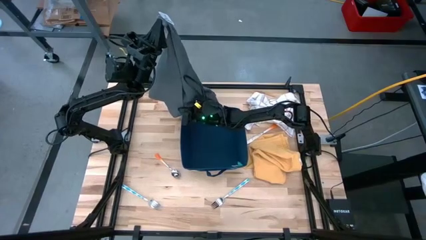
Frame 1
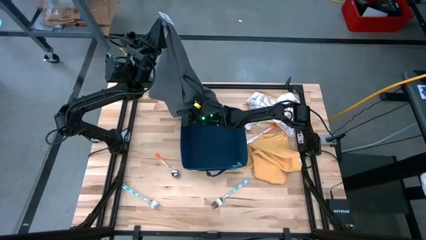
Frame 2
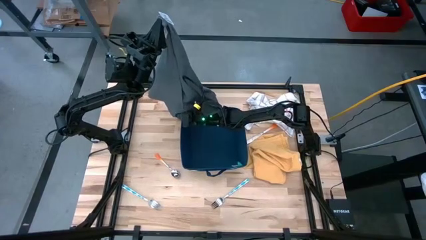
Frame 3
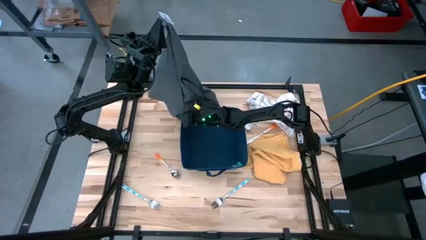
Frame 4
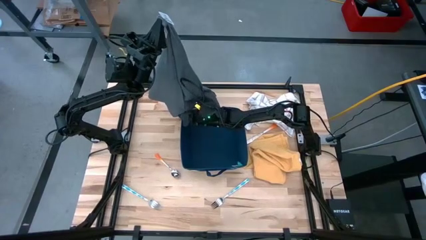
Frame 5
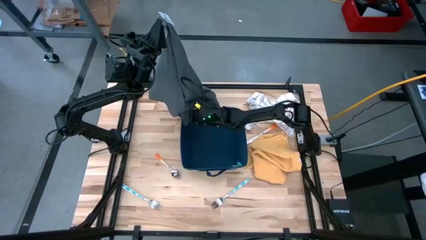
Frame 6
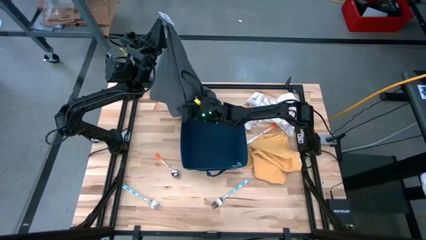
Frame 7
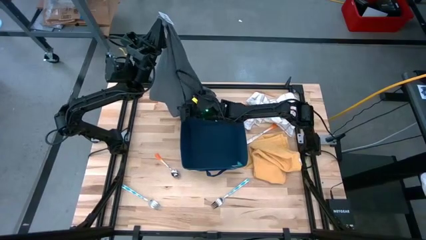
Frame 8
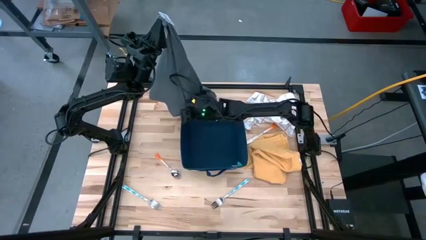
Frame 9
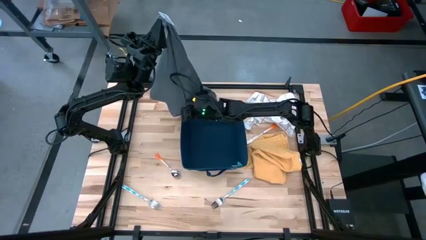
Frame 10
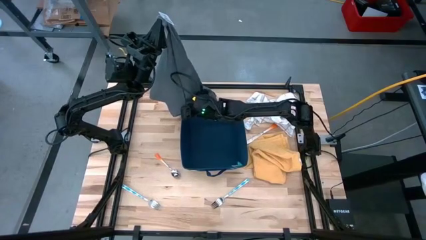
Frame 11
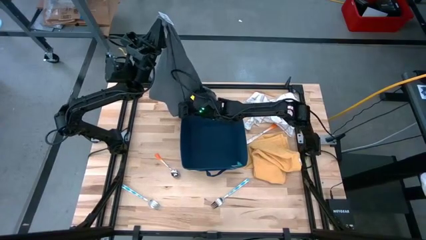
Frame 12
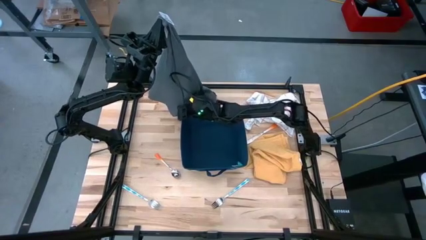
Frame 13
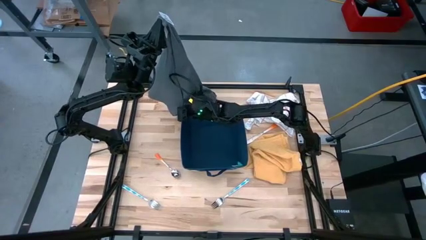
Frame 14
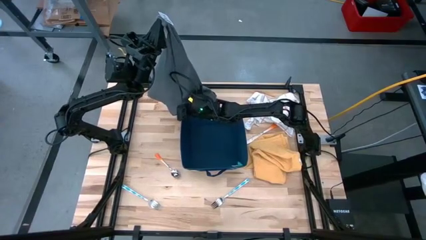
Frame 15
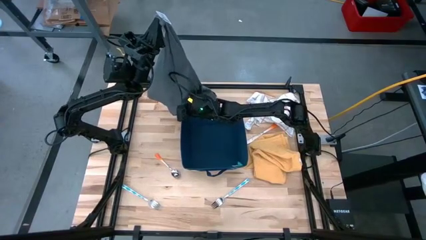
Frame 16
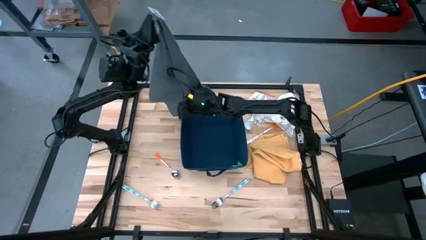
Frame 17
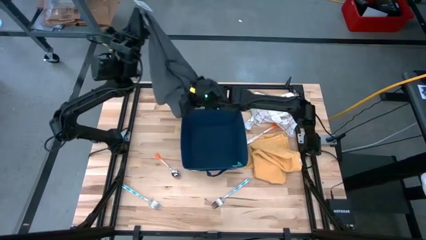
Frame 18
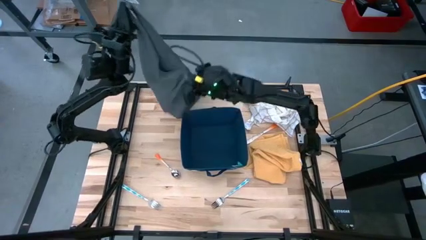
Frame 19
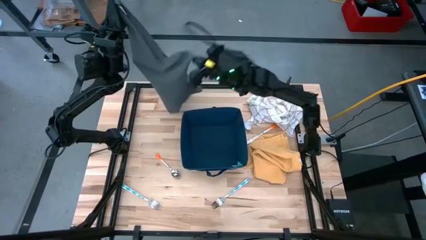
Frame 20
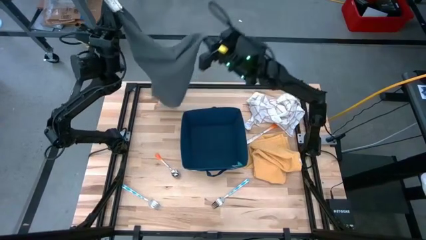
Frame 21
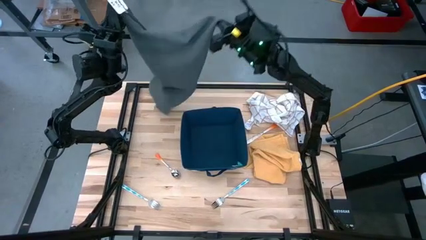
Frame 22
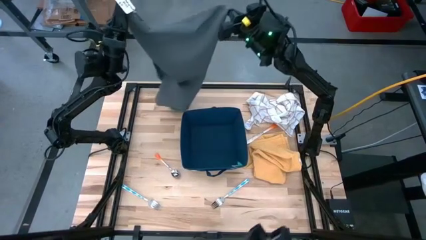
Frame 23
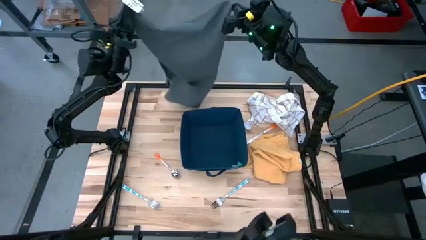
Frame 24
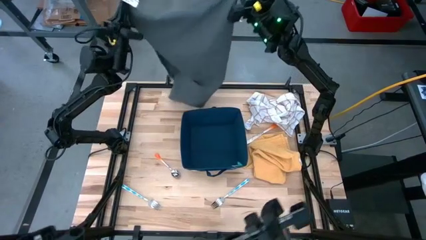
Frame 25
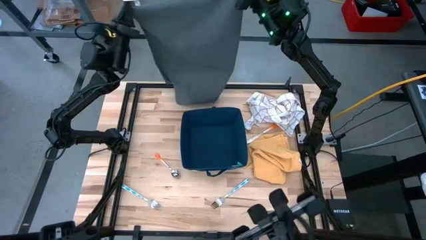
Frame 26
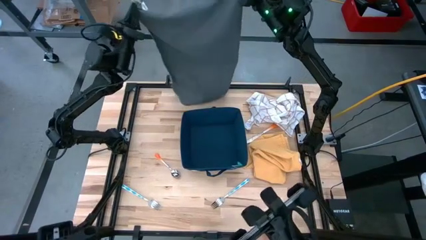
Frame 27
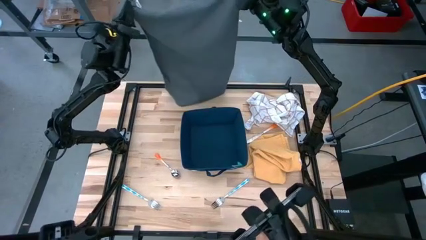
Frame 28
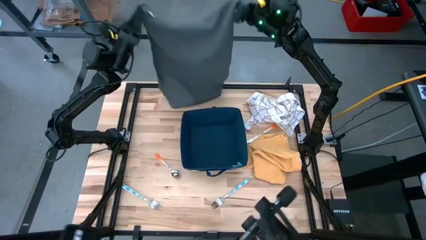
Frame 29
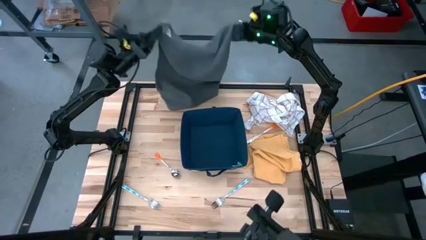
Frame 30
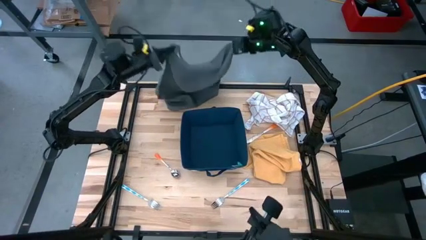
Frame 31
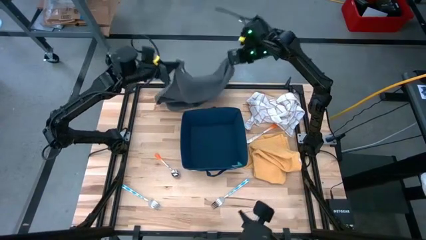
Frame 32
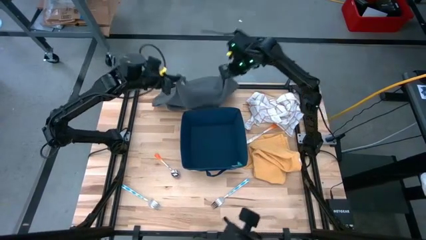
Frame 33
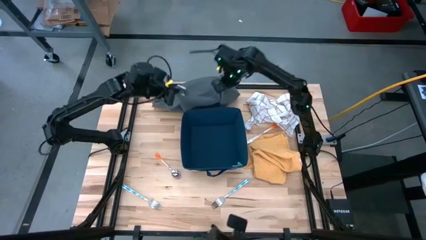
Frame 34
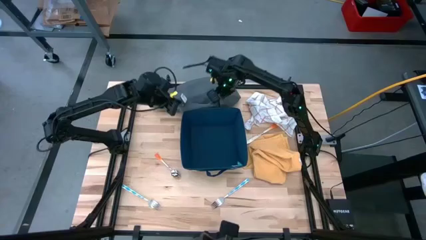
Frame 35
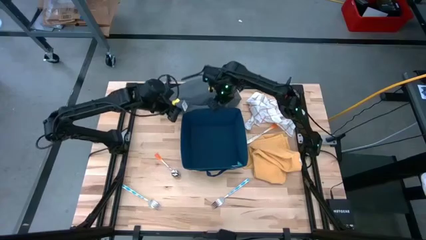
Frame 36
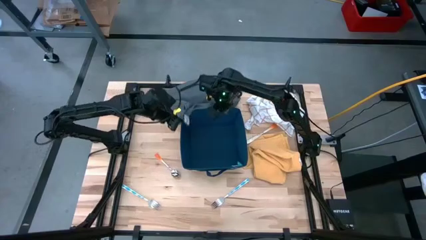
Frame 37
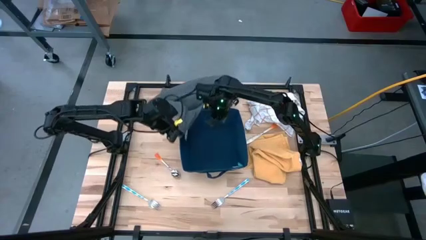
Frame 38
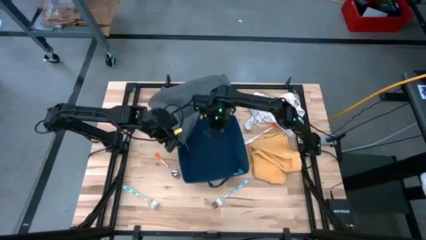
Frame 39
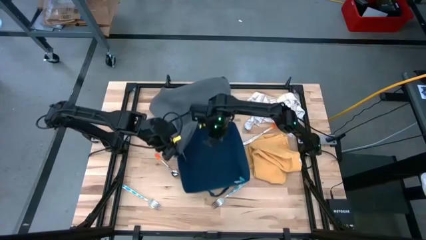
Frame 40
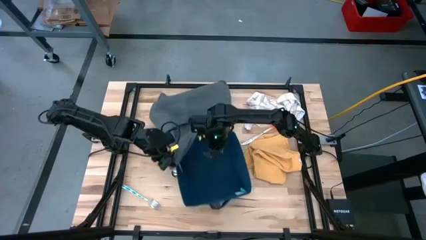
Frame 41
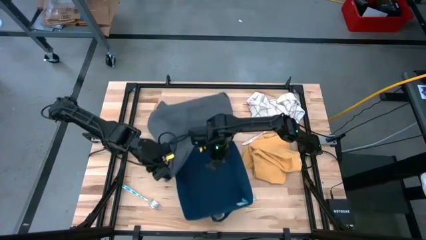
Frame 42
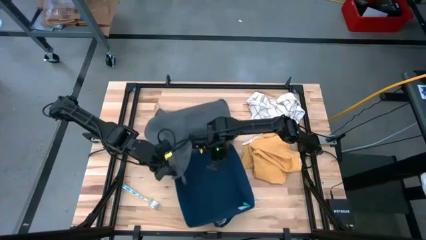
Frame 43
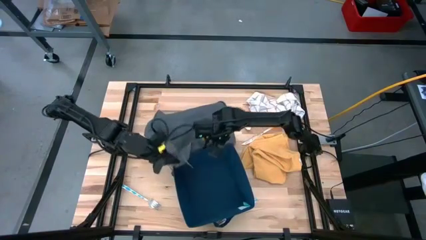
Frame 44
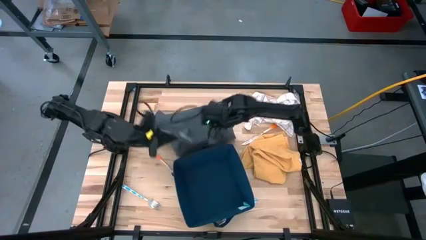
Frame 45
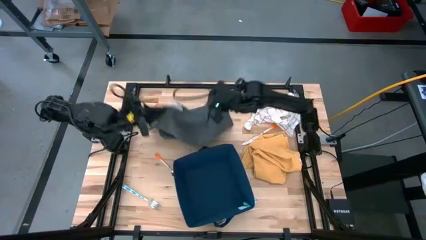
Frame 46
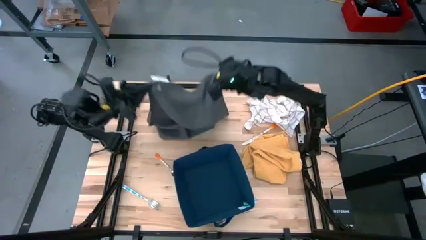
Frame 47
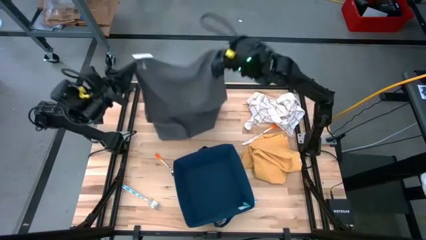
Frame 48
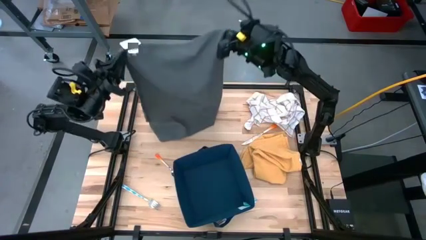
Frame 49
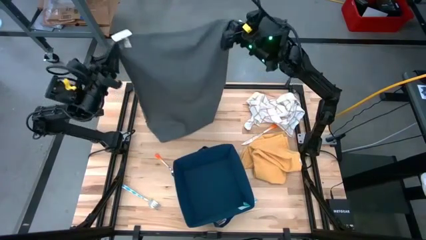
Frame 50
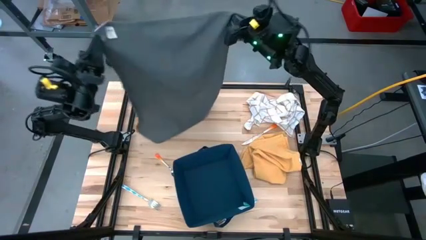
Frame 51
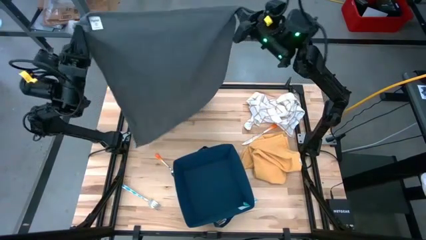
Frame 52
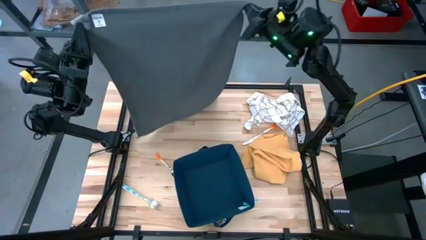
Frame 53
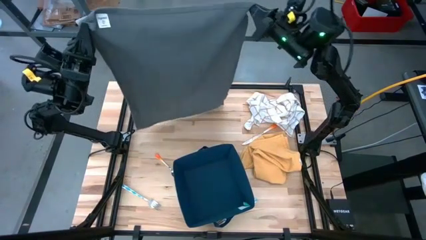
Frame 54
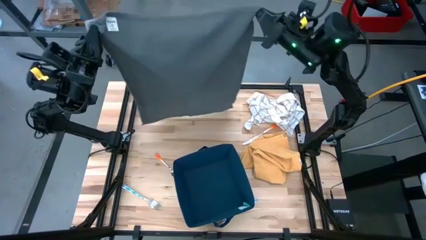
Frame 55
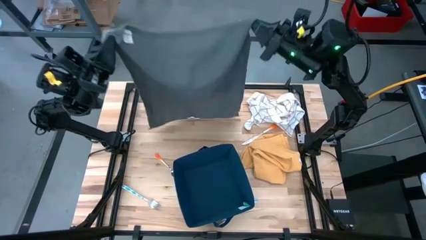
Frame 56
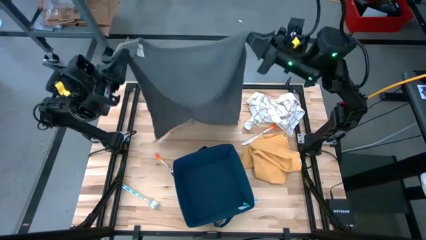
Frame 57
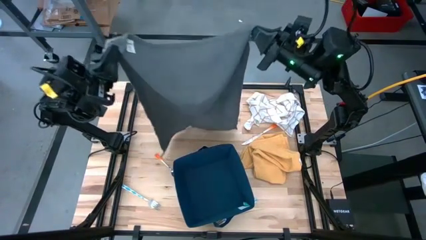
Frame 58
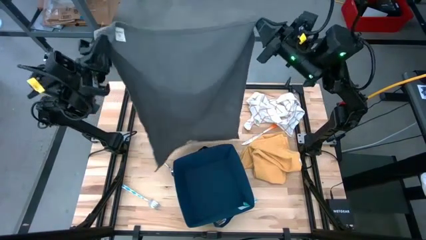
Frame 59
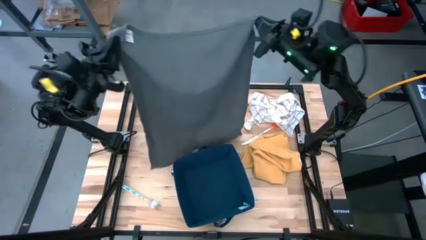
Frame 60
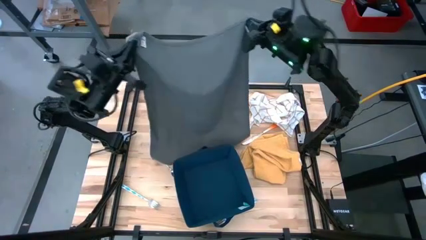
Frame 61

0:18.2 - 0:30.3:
Task: Fold towel
Fold the gray towel
